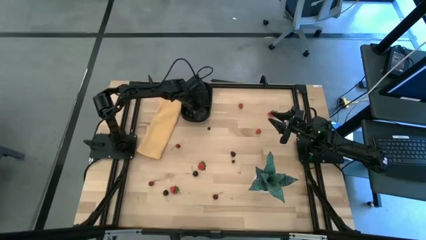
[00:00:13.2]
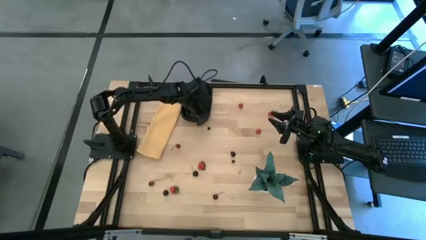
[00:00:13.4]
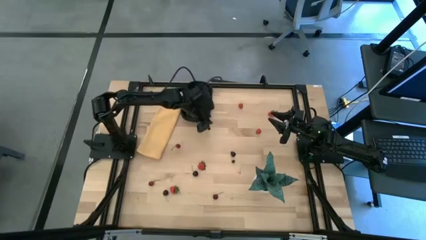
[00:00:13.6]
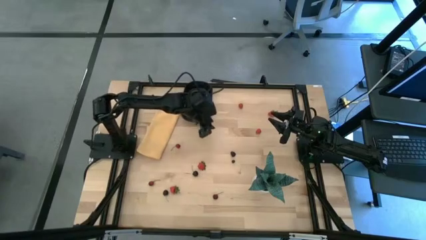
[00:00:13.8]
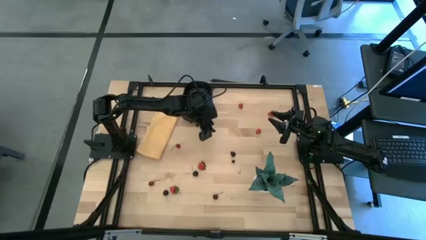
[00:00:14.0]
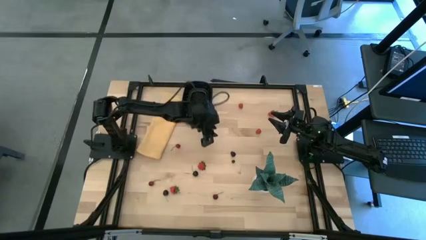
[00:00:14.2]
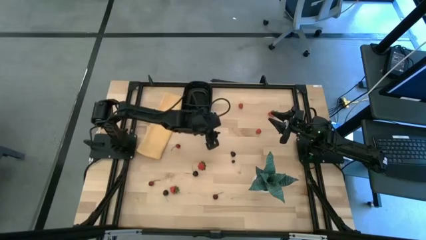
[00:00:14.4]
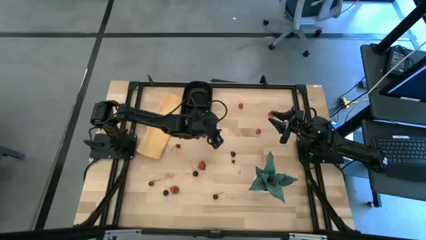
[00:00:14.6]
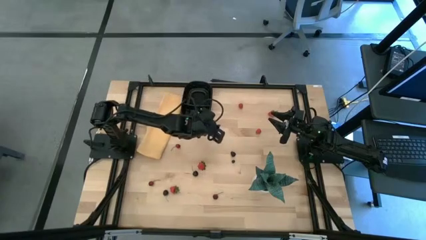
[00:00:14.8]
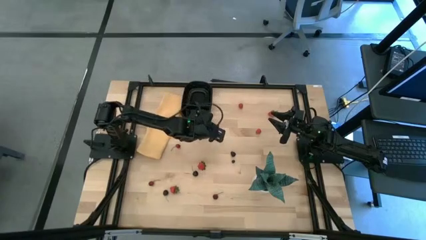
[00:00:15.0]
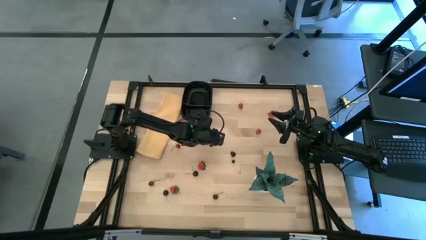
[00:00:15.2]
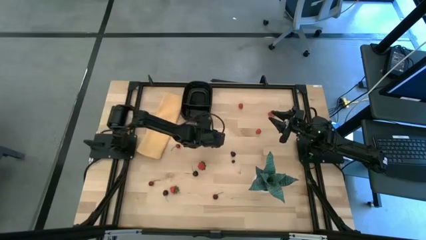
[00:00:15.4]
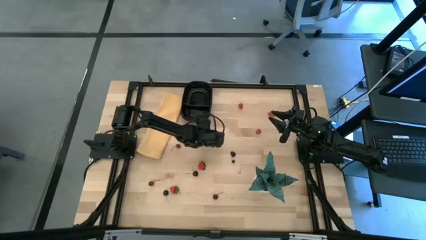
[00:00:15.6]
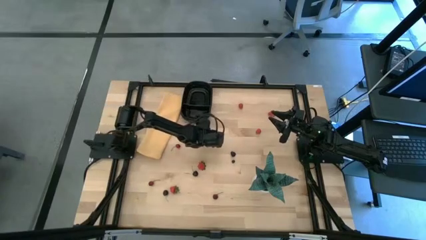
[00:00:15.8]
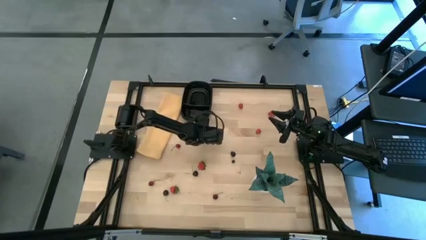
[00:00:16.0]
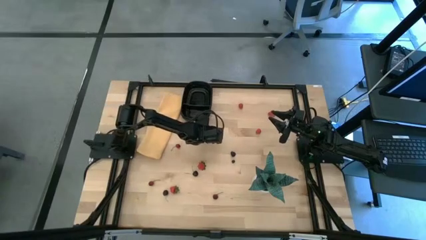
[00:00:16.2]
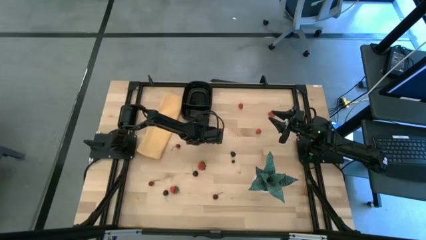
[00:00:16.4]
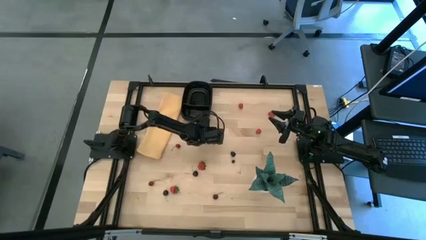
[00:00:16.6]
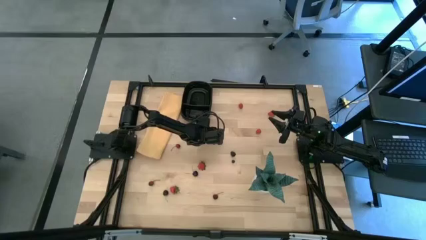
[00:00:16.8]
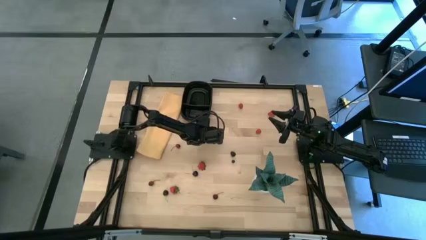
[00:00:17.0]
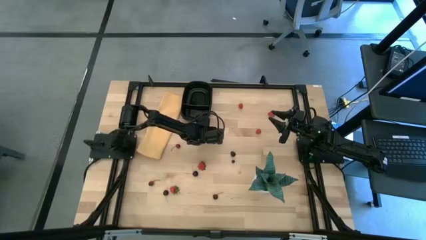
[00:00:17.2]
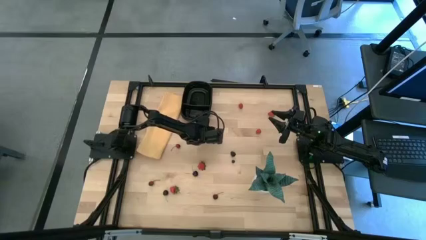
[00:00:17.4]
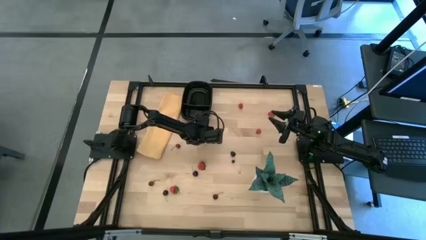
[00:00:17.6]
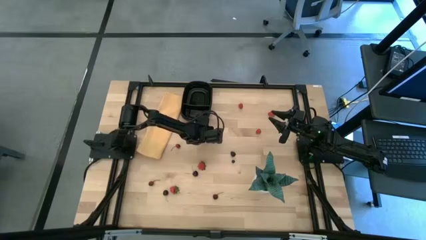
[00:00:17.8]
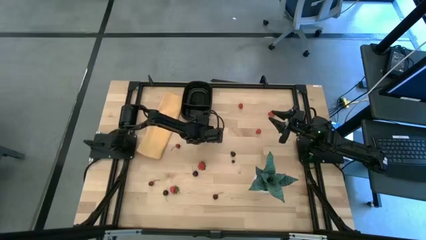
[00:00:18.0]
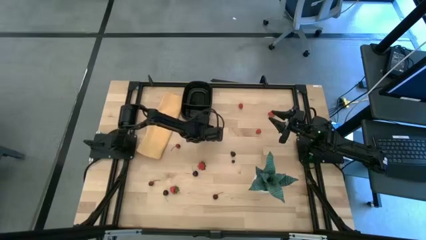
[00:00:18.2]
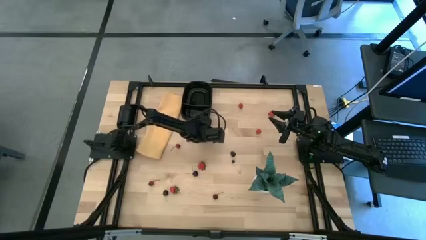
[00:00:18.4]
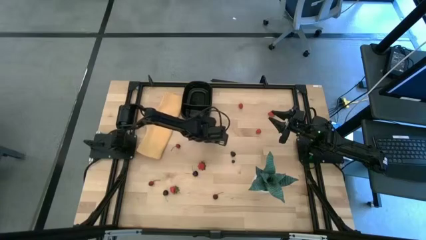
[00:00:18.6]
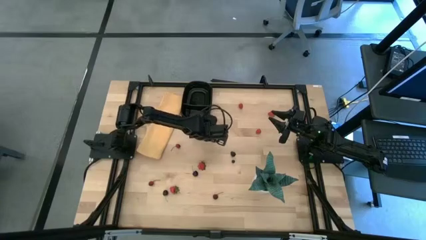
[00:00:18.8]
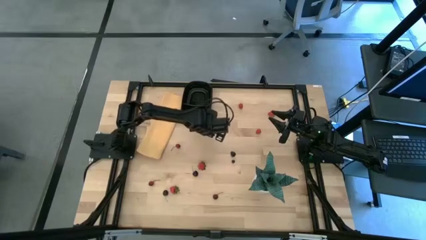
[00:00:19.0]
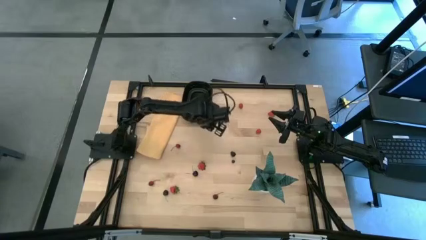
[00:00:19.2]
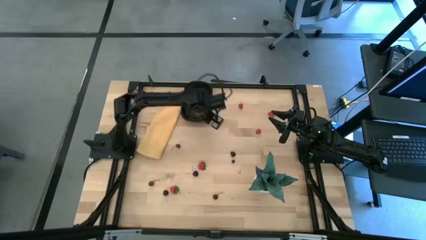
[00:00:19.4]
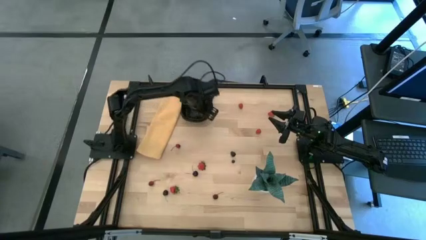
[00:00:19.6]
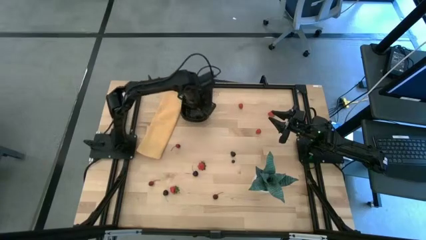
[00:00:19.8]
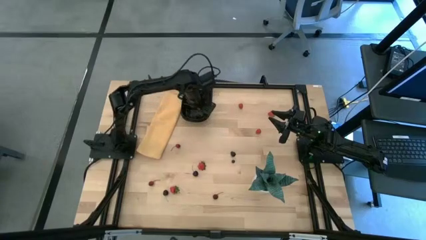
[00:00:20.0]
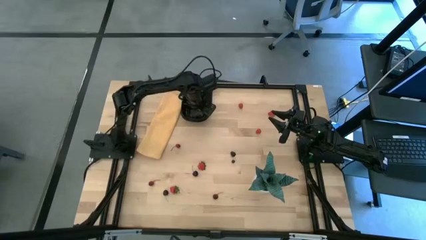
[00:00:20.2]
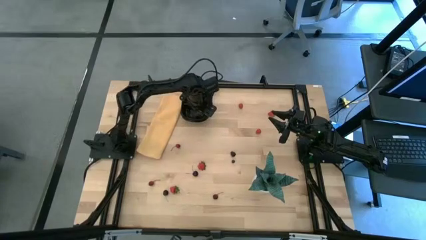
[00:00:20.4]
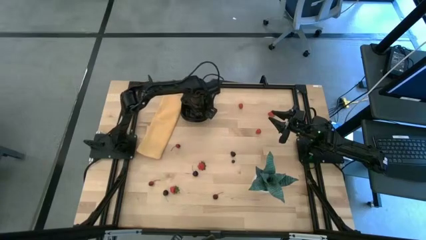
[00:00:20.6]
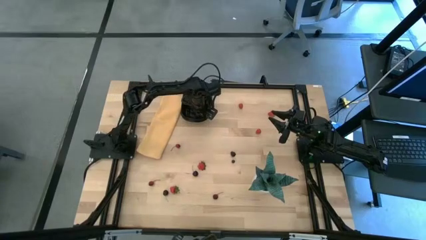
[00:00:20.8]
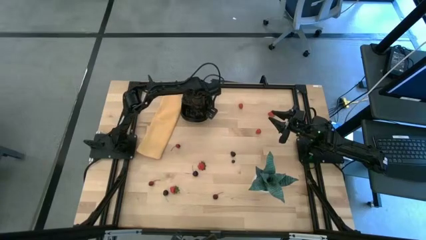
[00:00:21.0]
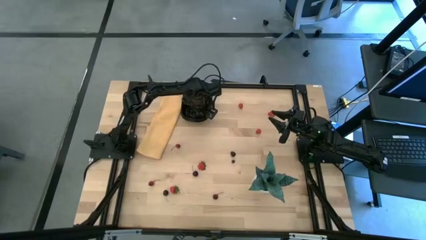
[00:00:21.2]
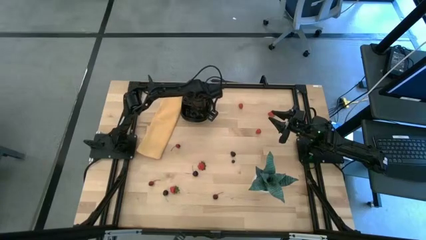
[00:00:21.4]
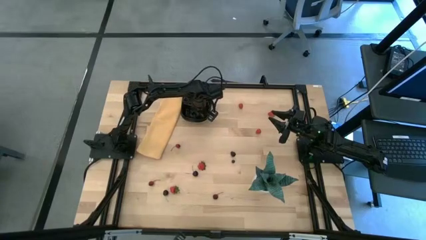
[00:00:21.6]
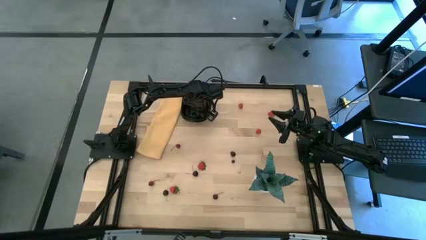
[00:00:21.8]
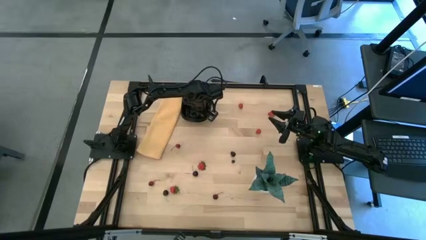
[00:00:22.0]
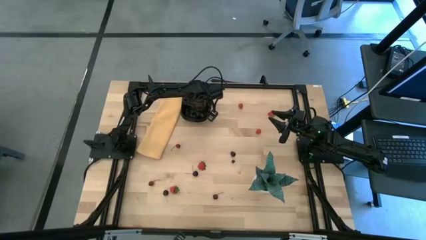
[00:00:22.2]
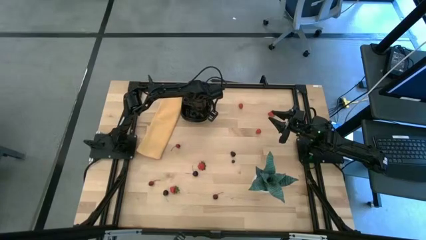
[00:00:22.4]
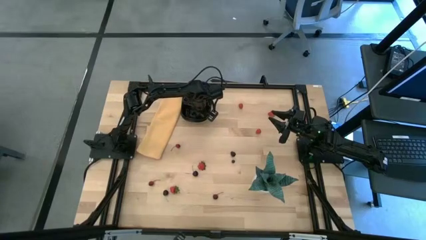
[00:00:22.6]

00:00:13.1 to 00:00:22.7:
Task: Pick and placing Produce into tupperware
Put the top blueberry into the black bin

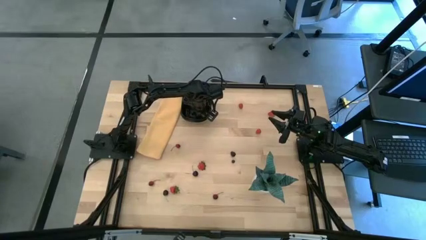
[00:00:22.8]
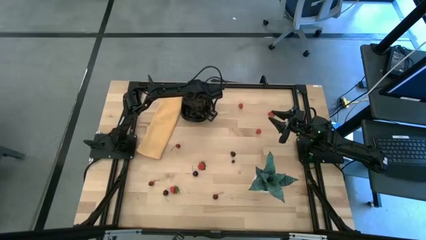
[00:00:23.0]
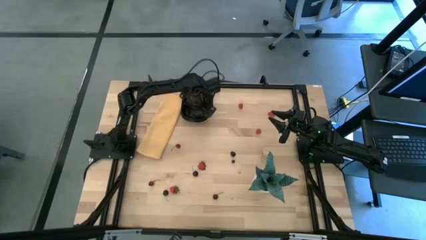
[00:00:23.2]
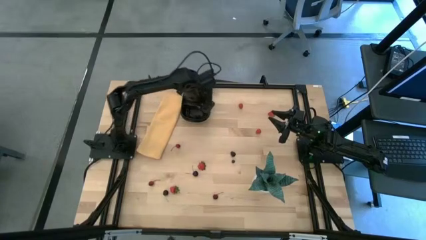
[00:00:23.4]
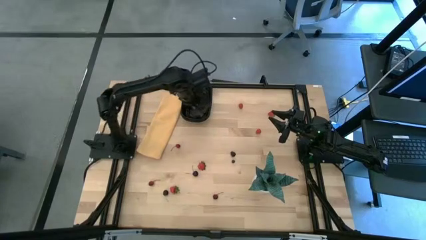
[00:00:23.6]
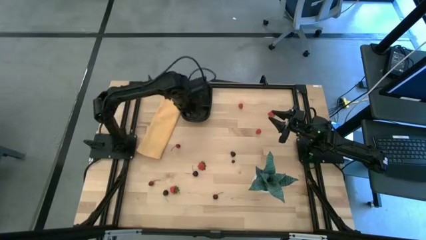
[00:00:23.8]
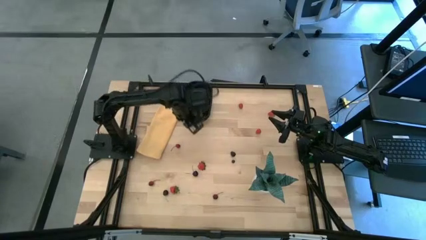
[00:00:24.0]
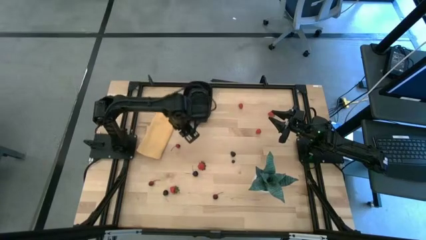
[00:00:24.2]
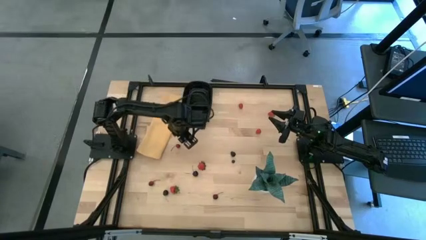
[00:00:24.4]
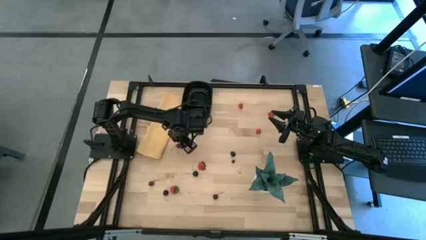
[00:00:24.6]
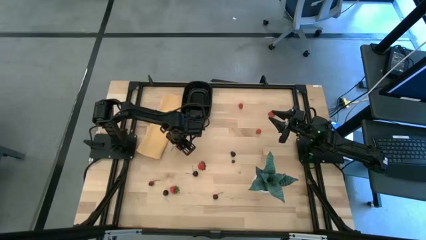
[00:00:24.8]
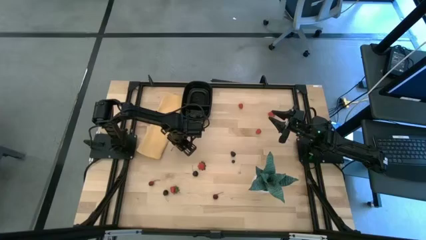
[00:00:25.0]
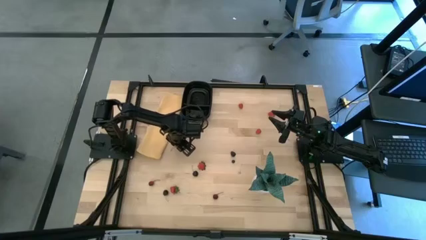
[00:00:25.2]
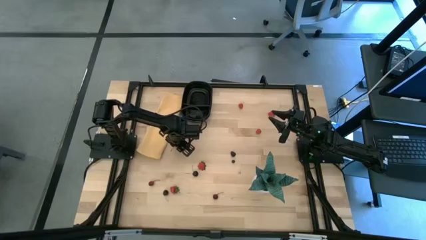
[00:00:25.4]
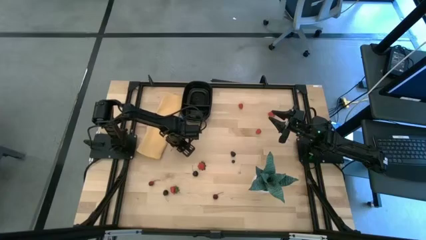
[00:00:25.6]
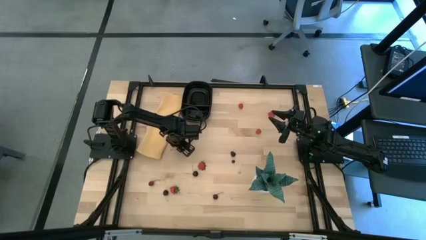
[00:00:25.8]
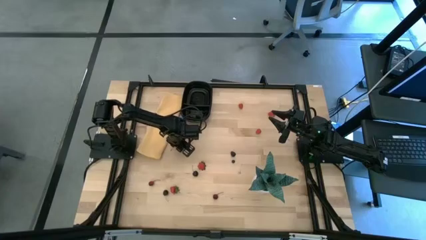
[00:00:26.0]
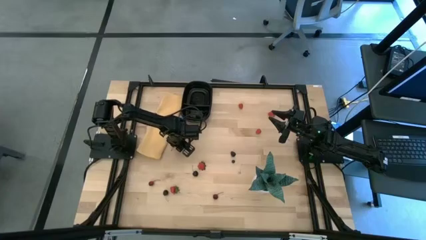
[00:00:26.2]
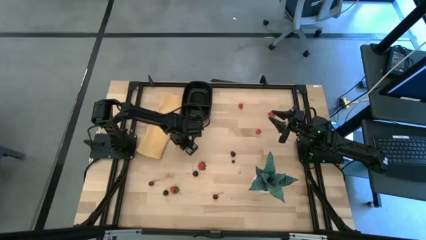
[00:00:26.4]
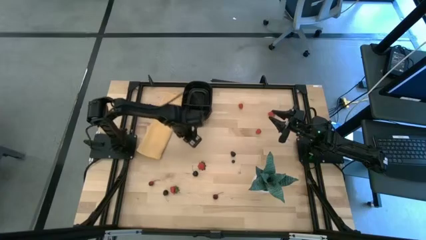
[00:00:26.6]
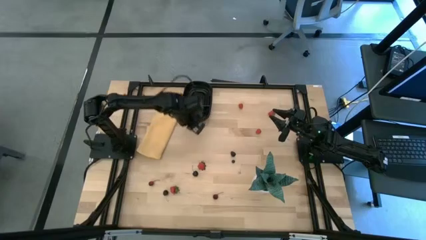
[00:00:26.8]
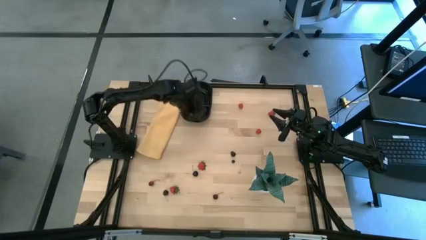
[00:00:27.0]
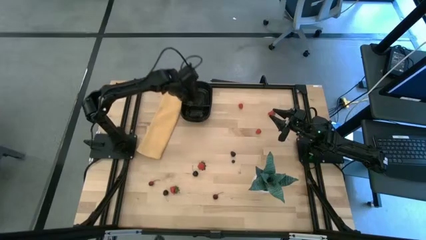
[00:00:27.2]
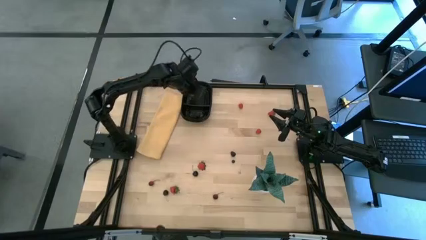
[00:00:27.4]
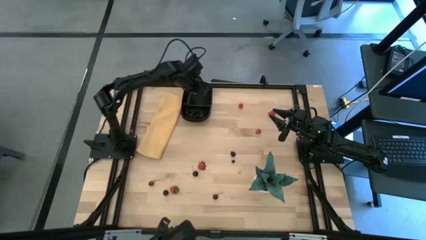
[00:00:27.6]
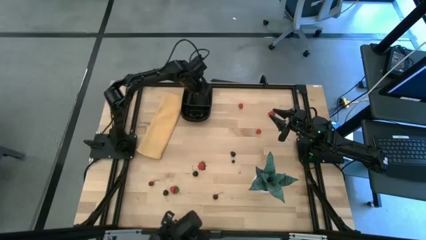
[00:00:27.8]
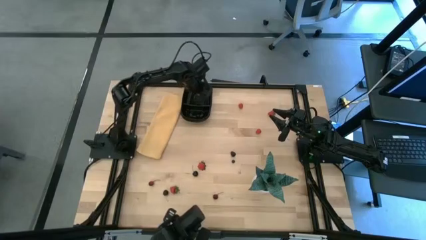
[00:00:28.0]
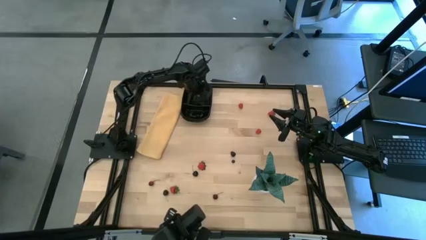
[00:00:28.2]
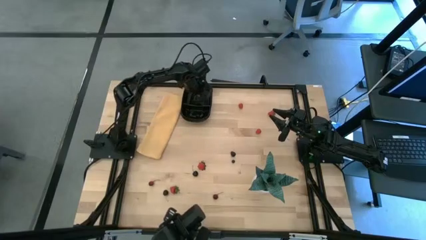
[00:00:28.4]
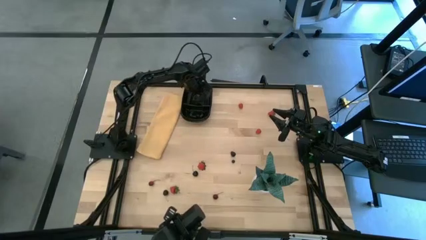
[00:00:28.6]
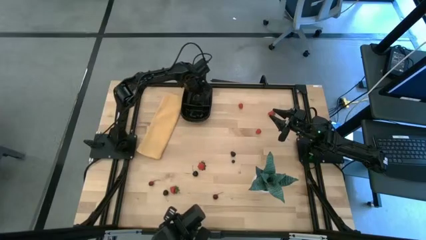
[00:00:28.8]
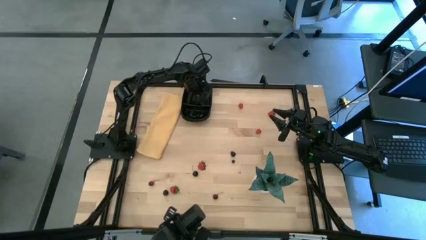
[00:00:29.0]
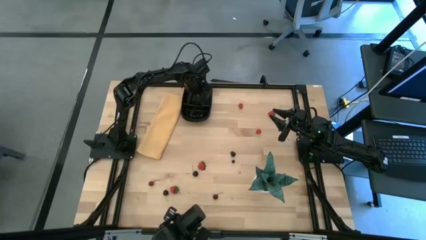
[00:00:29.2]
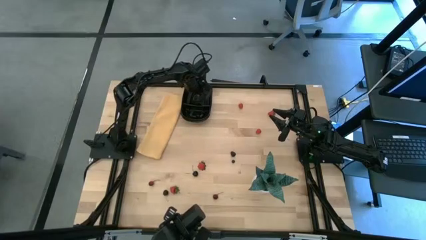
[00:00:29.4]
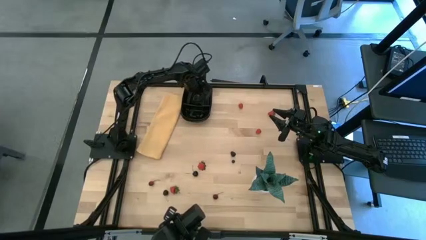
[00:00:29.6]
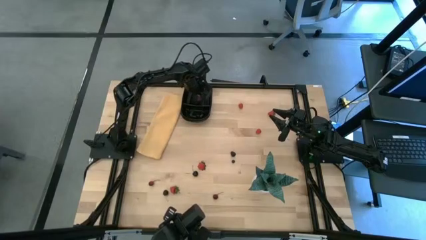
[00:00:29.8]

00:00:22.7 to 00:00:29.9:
Put the top red cherry into the black bin
